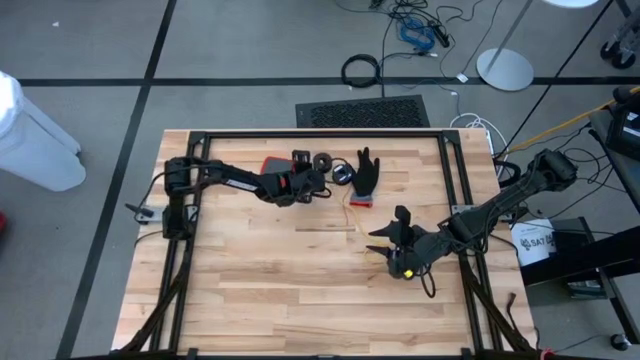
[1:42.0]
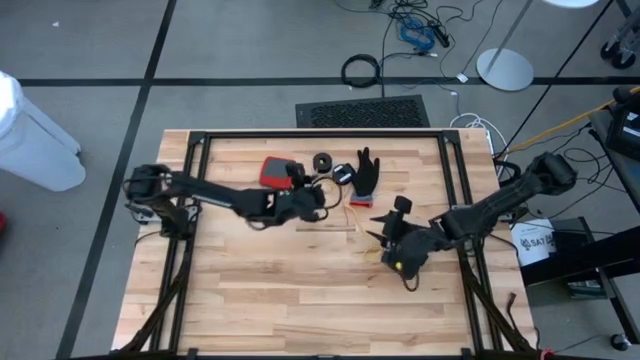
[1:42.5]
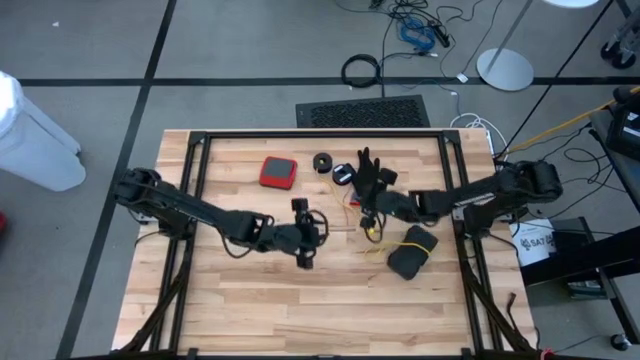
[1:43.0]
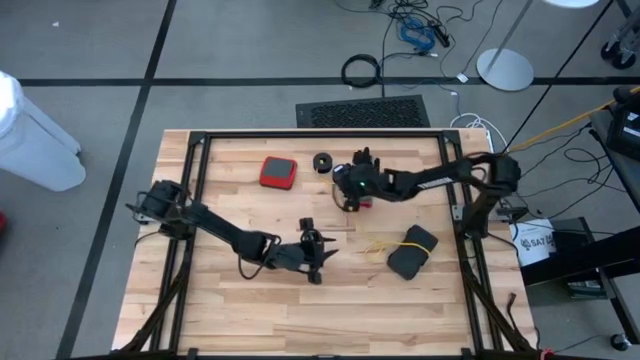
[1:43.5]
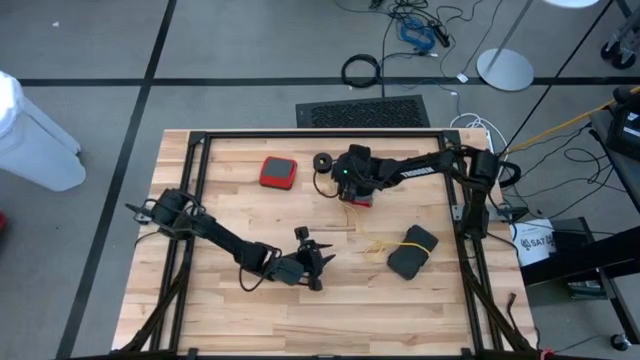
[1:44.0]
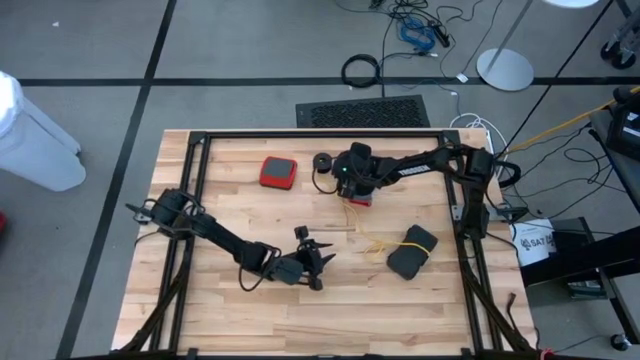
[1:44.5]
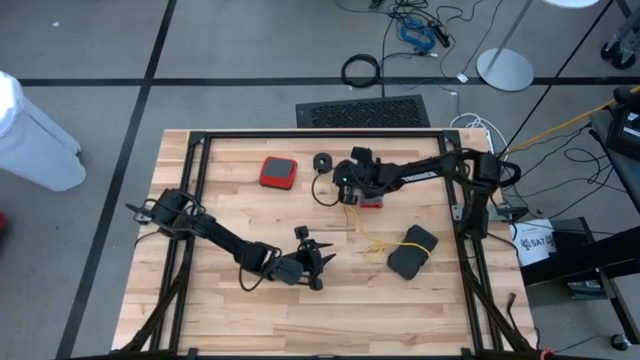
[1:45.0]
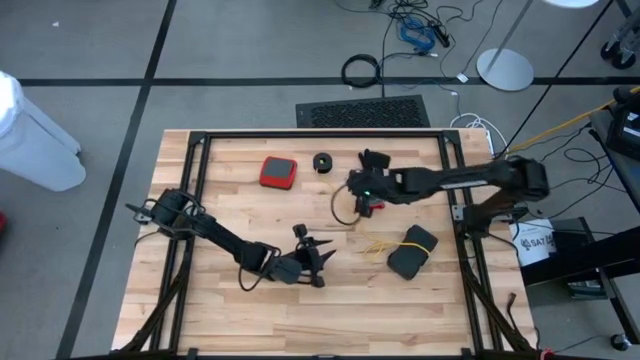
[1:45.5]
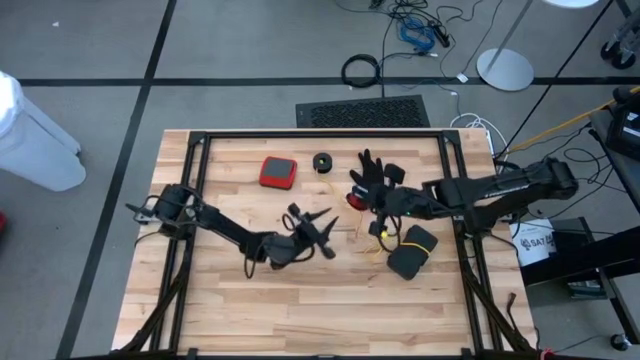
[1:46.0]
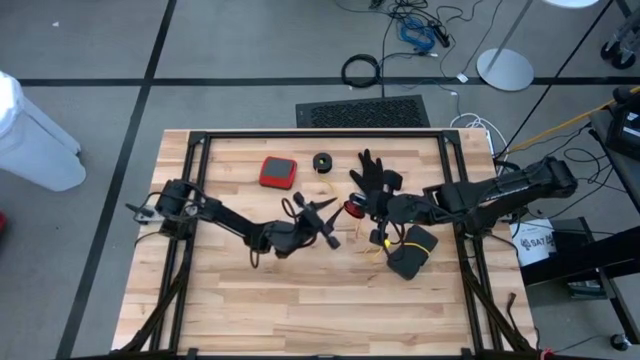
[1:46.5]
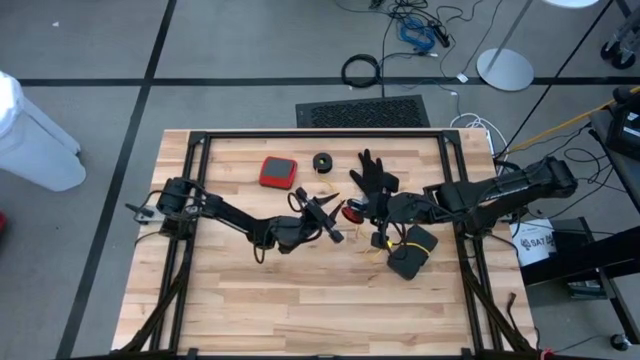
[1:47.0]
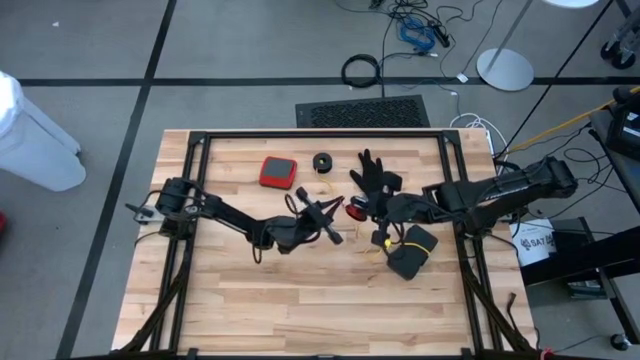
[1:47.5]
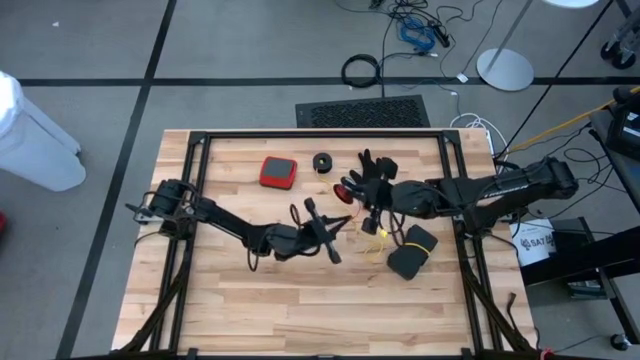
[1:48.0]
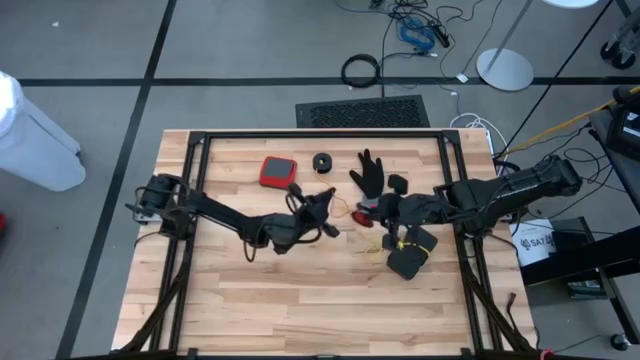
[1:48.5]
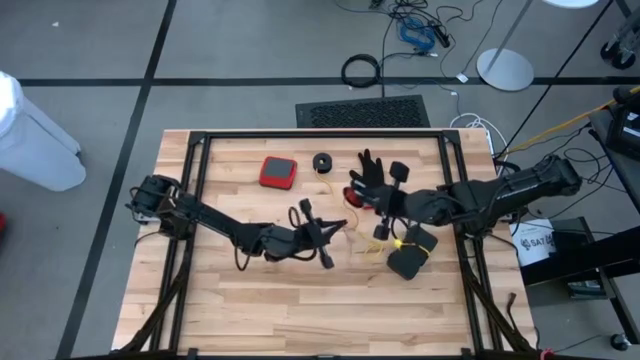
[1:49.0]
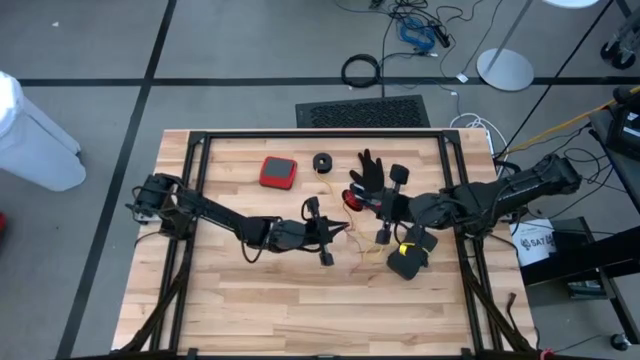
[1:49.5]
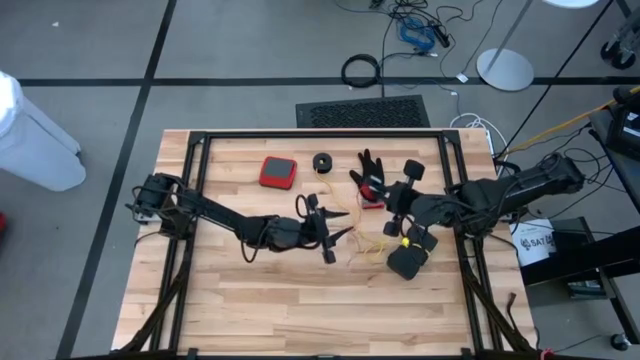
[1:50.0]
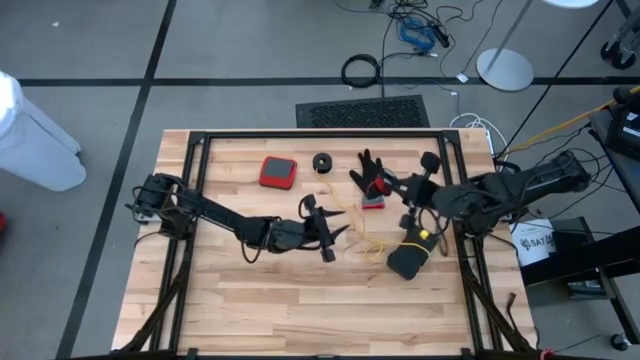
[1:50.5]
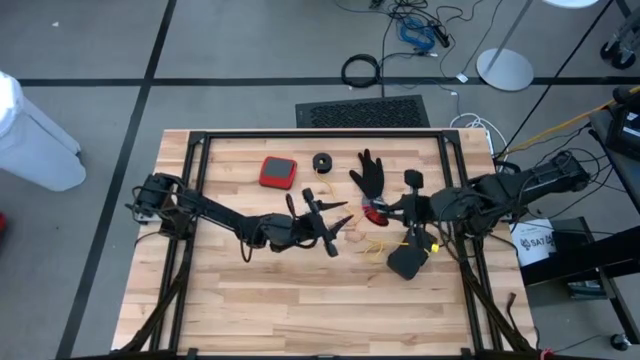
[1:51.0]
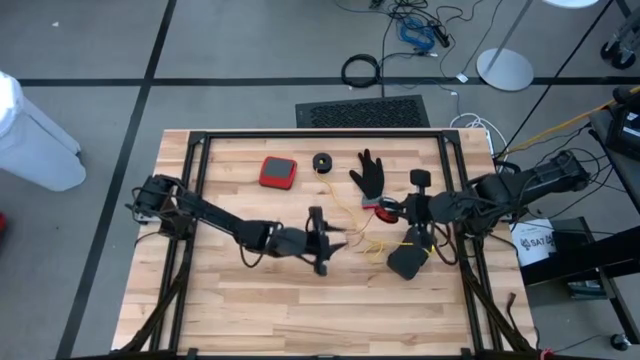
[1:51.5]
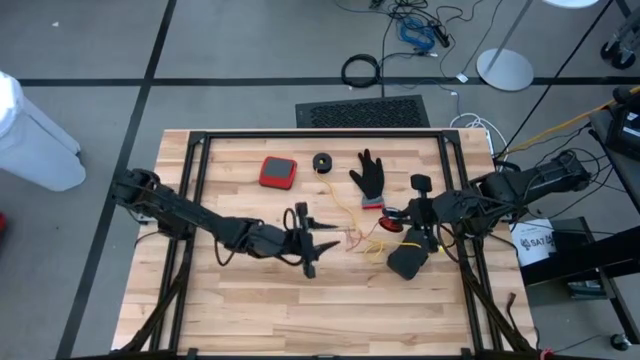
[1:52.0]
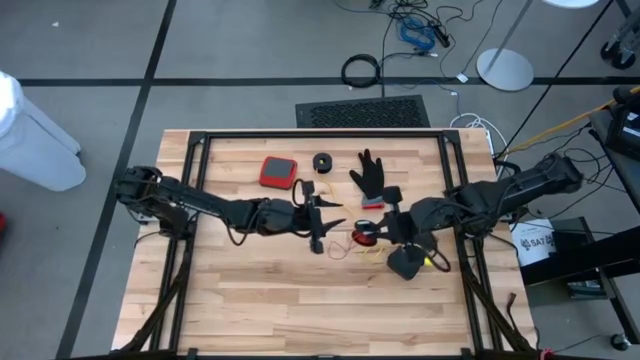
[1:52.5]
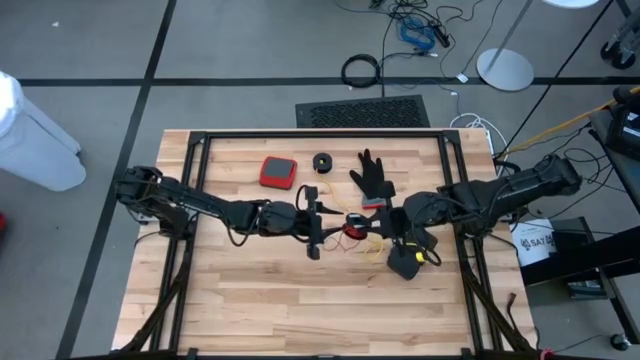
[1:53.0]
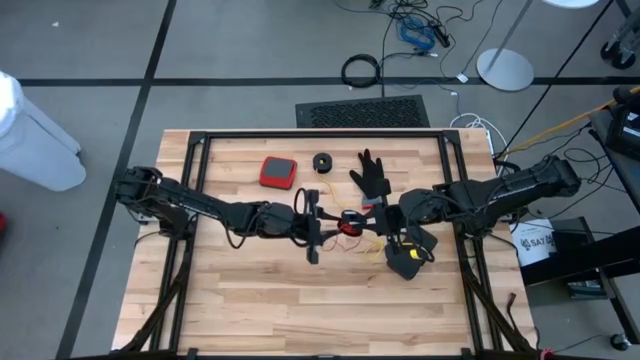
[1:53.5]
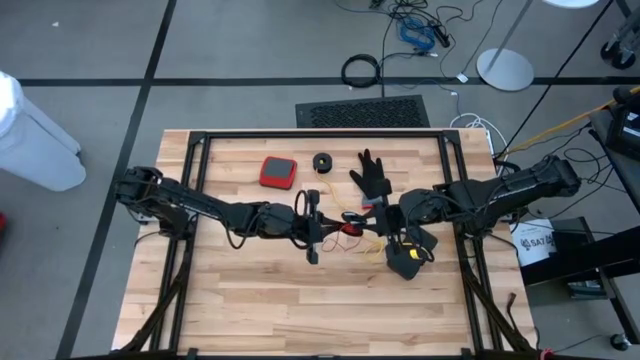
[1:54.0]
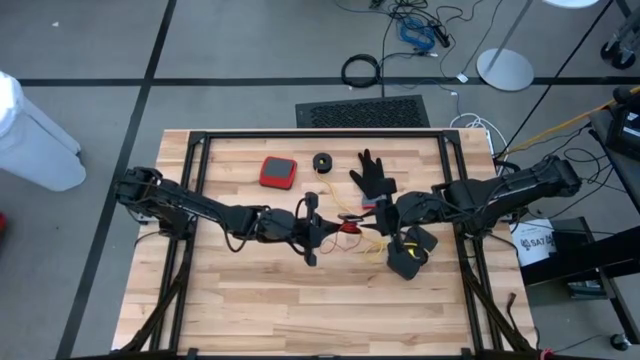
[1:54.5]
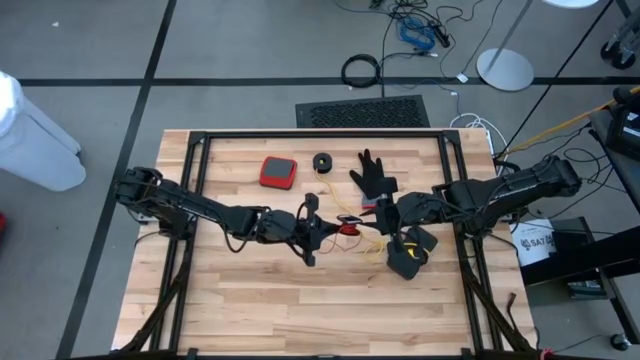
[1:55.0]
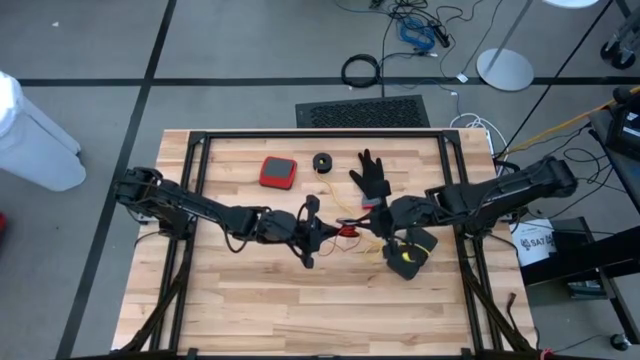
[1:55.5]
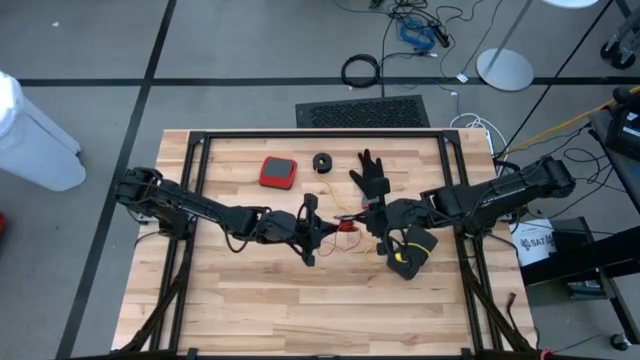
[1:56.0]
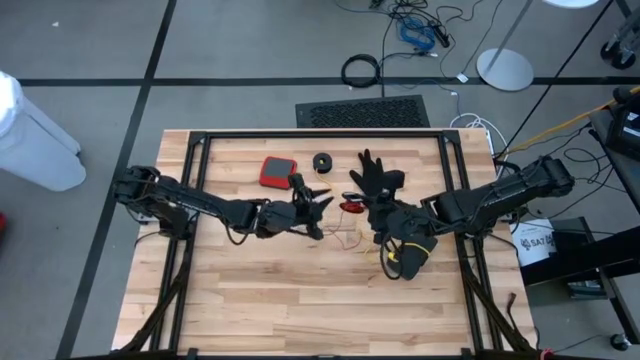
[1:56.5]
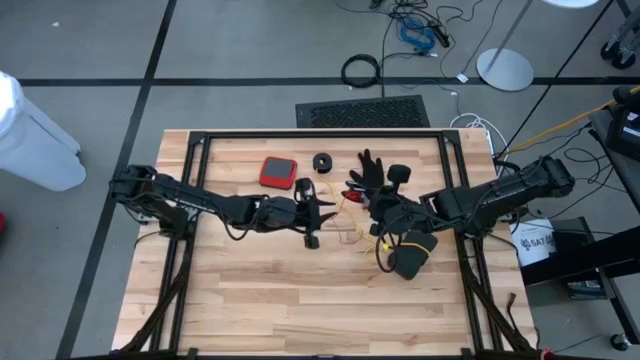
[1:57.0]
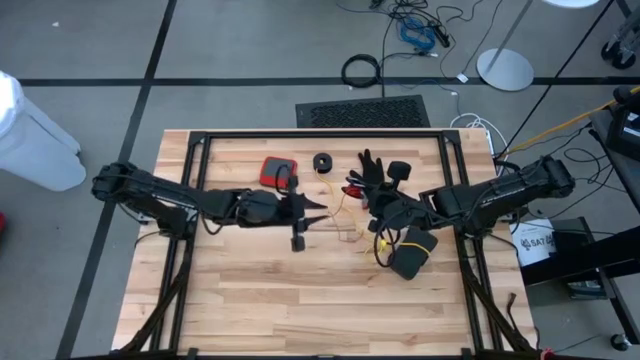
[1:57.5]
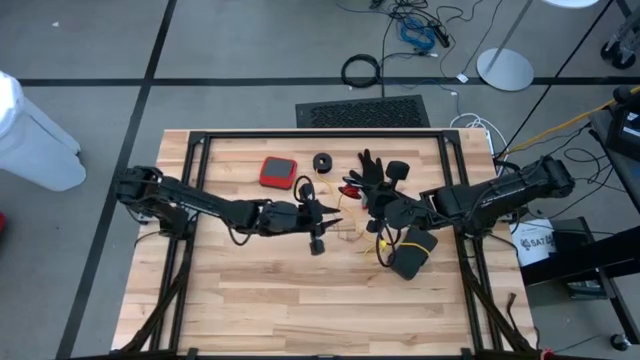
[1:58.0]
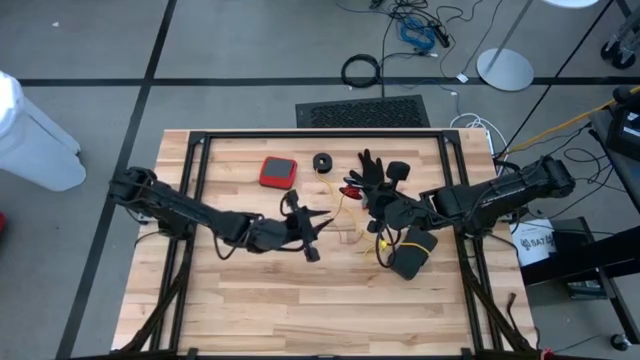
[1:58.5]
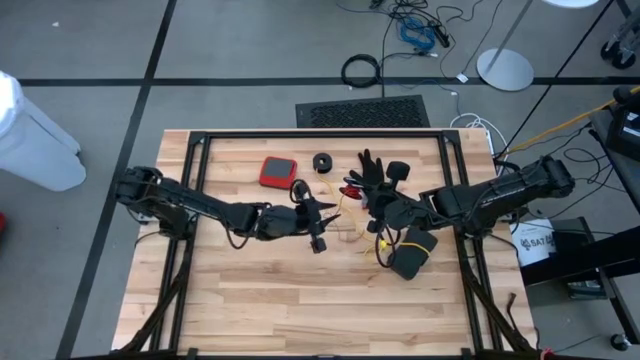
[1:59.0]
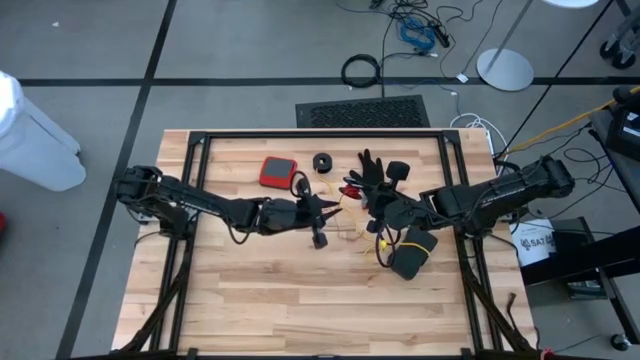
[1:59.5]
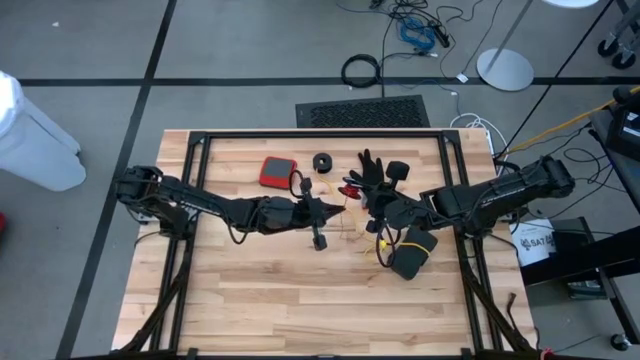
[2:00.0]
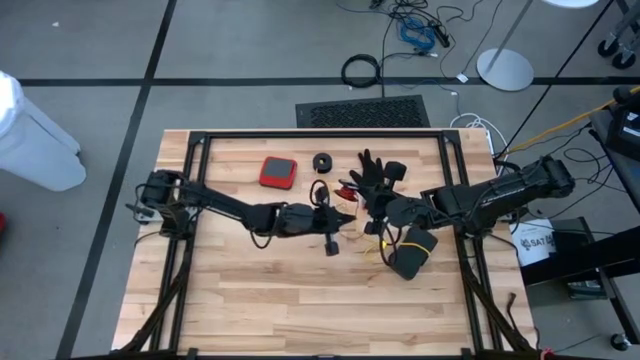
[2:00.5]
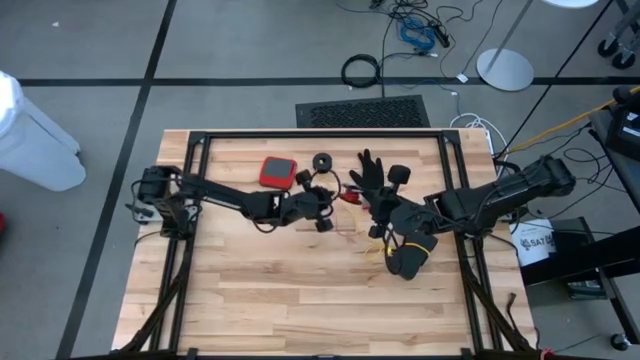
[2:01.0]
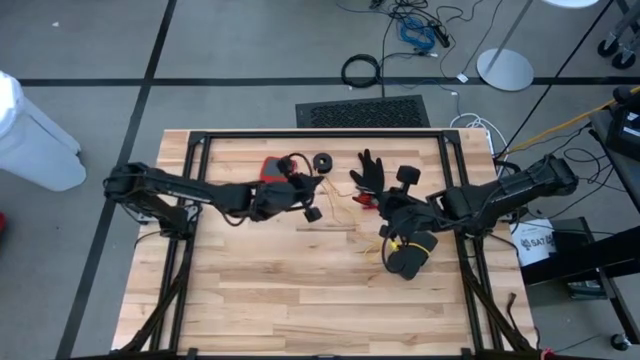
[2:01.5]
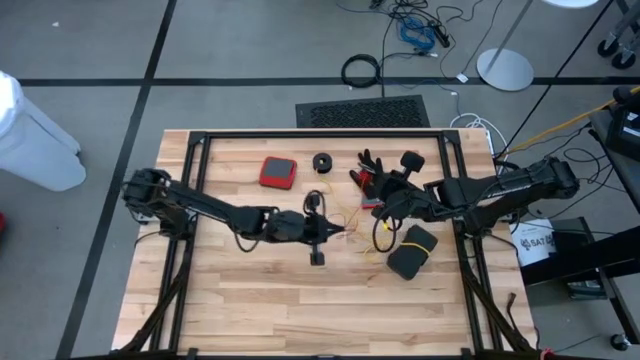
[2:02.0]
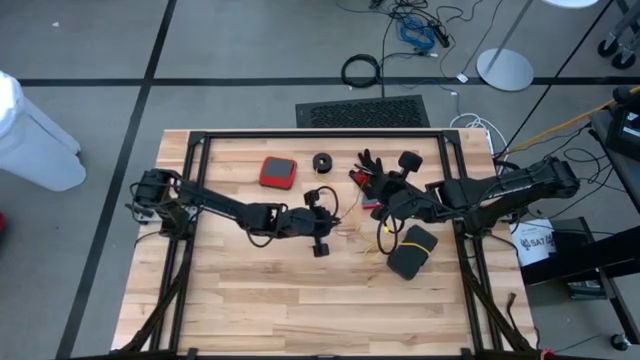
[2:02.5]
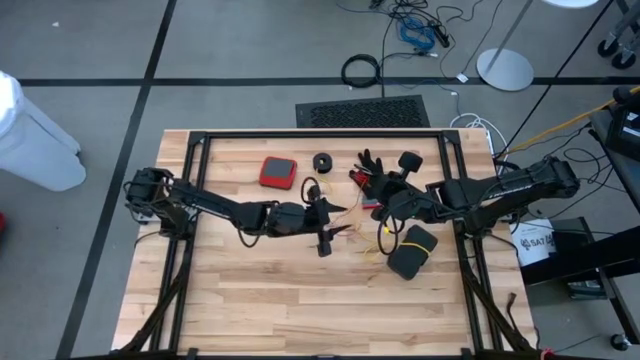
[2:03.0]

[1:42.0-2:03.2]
Task: Coil cords
Uncoil the red wire from the spool
